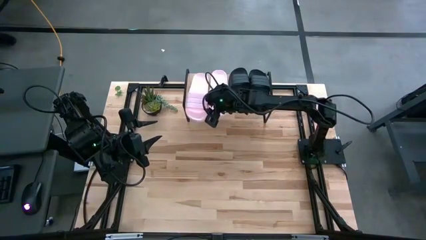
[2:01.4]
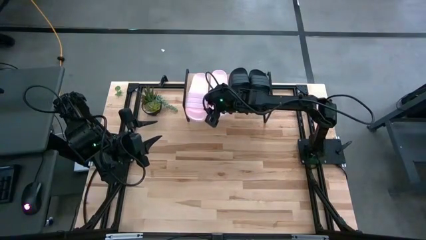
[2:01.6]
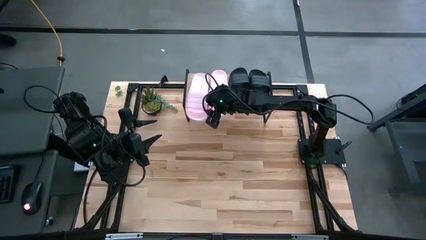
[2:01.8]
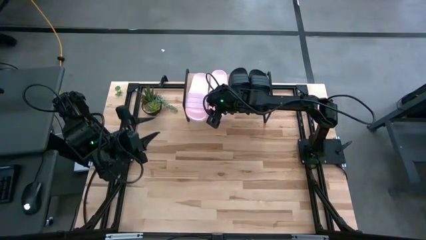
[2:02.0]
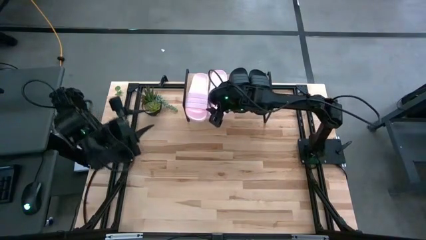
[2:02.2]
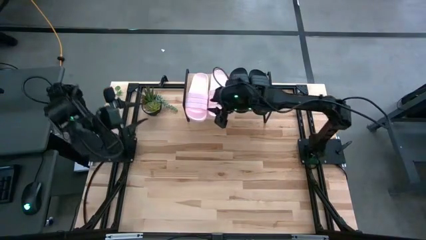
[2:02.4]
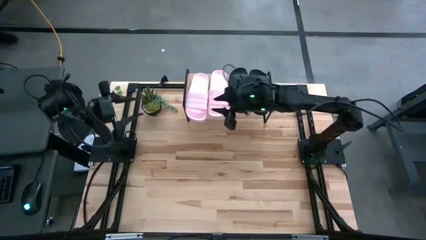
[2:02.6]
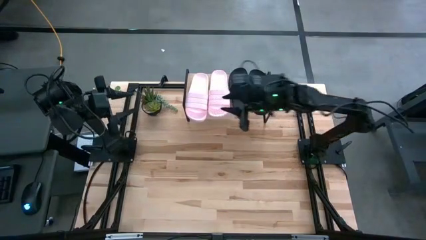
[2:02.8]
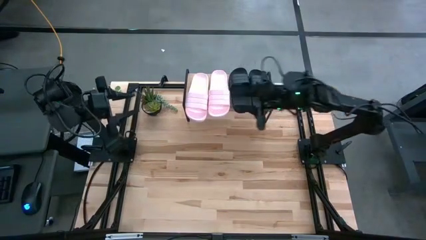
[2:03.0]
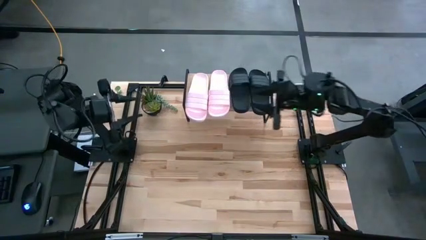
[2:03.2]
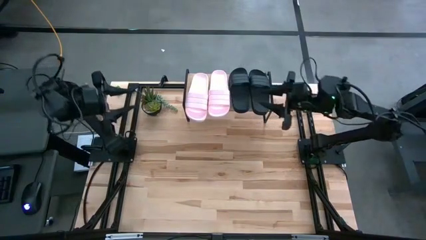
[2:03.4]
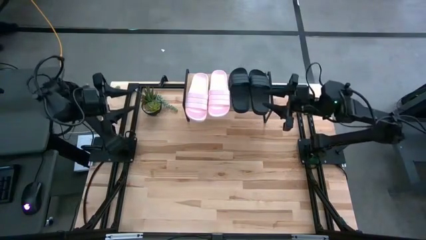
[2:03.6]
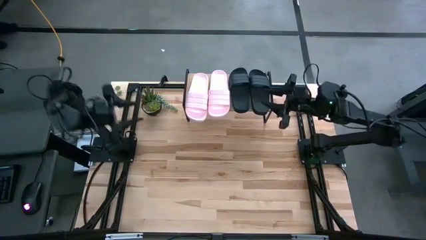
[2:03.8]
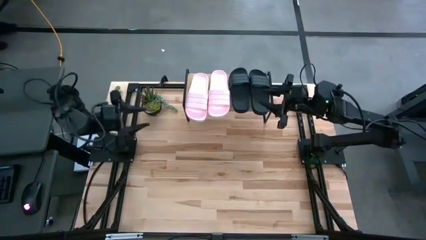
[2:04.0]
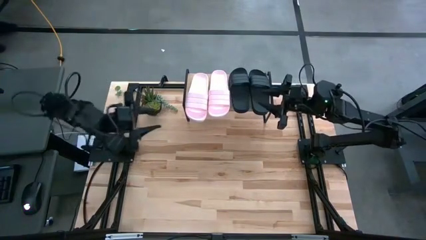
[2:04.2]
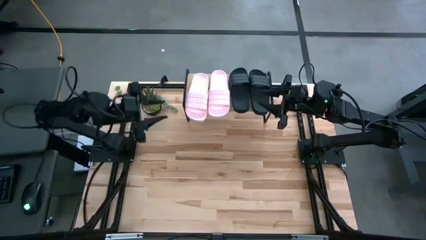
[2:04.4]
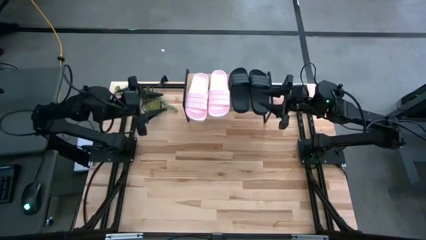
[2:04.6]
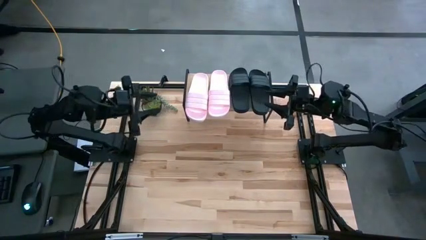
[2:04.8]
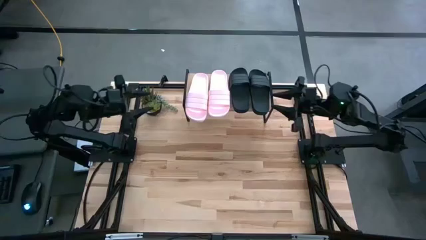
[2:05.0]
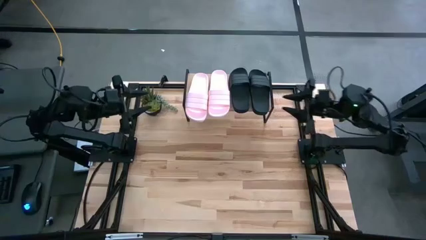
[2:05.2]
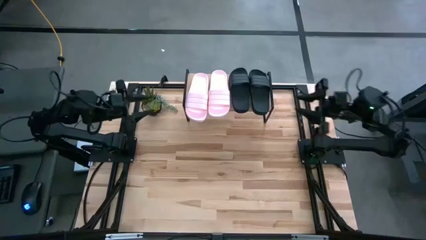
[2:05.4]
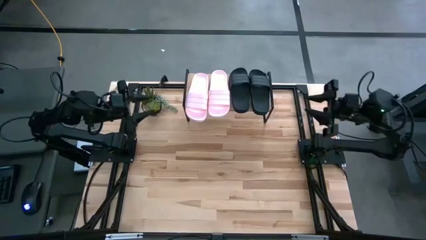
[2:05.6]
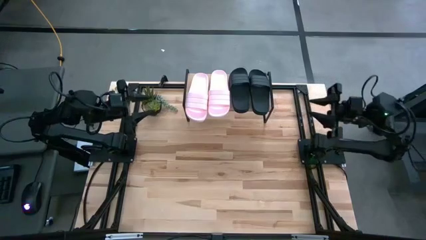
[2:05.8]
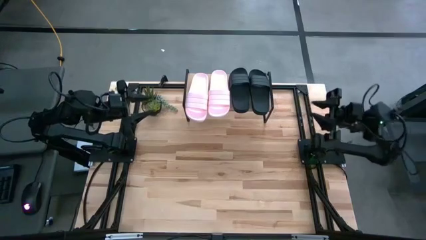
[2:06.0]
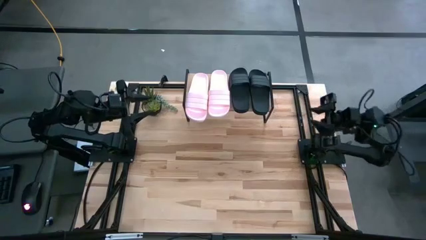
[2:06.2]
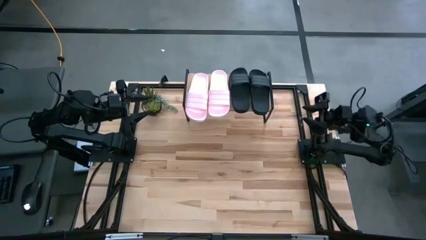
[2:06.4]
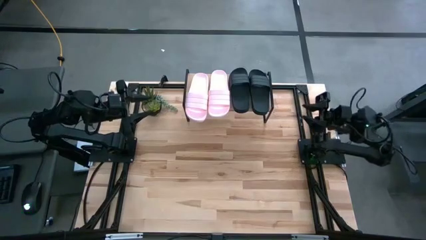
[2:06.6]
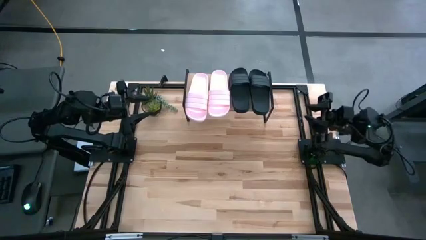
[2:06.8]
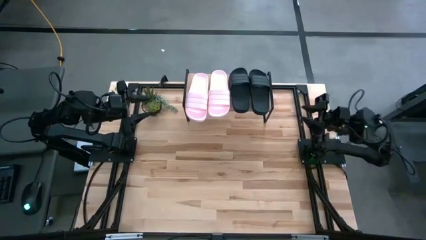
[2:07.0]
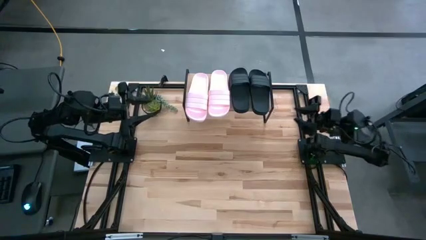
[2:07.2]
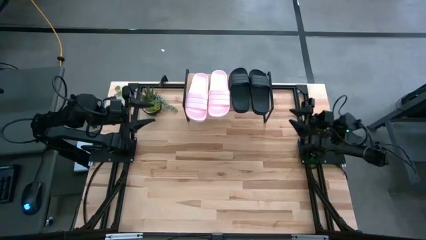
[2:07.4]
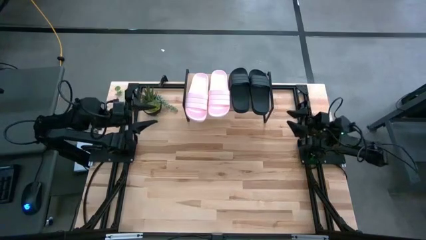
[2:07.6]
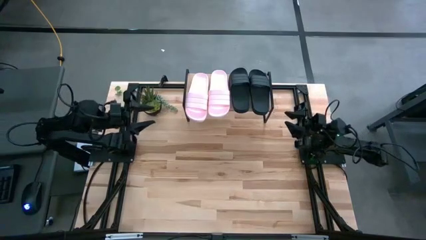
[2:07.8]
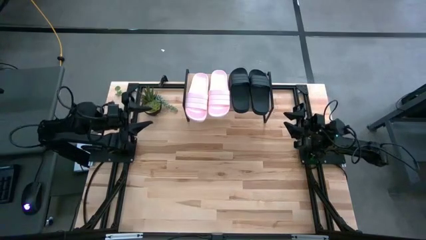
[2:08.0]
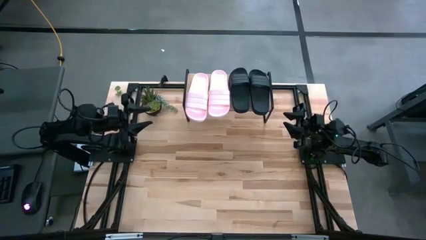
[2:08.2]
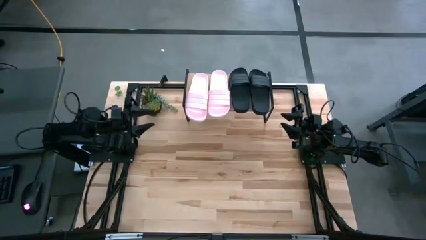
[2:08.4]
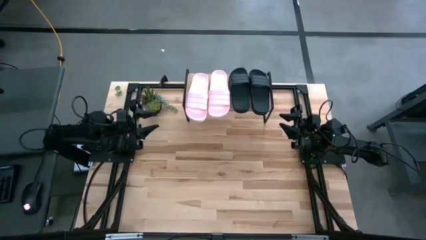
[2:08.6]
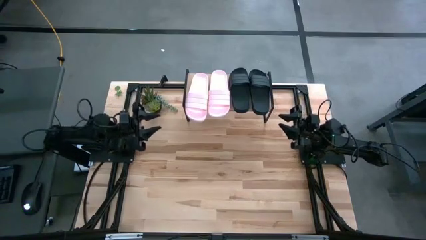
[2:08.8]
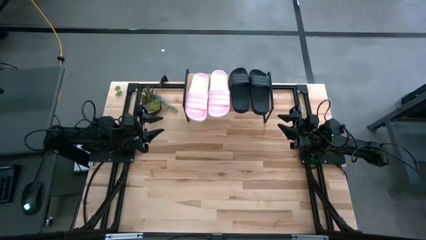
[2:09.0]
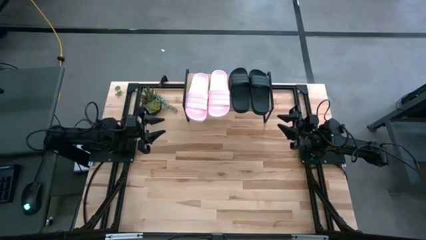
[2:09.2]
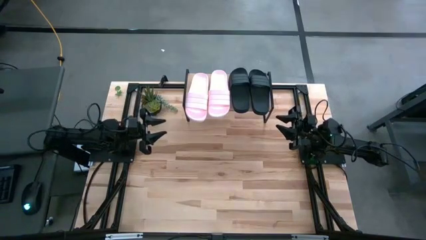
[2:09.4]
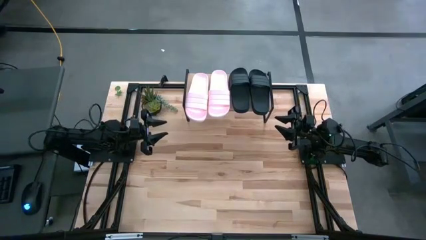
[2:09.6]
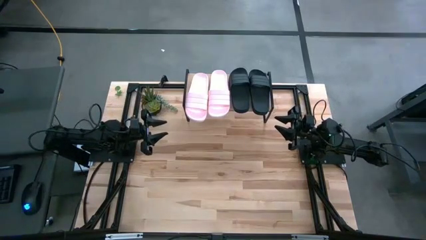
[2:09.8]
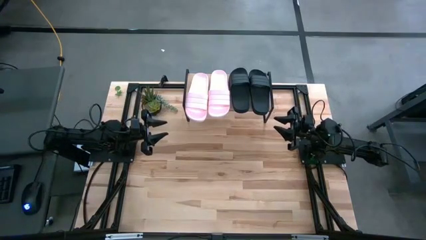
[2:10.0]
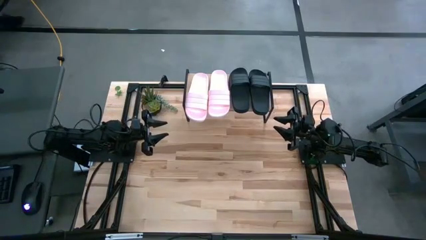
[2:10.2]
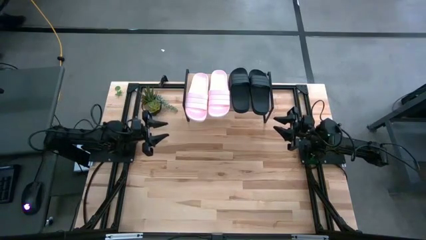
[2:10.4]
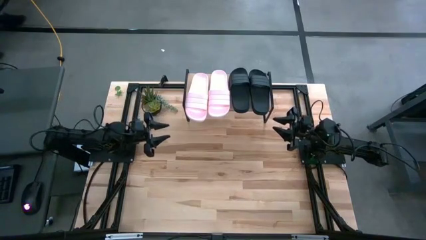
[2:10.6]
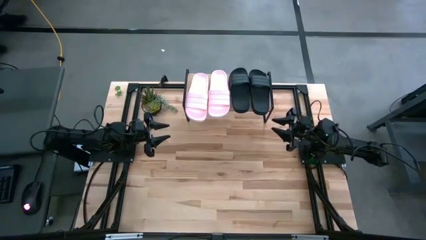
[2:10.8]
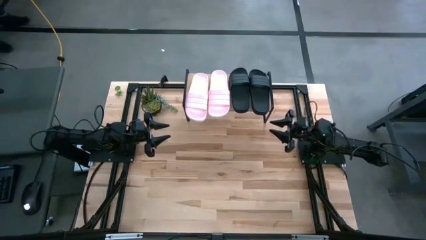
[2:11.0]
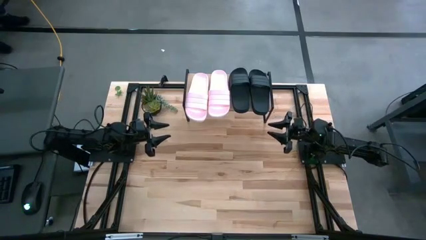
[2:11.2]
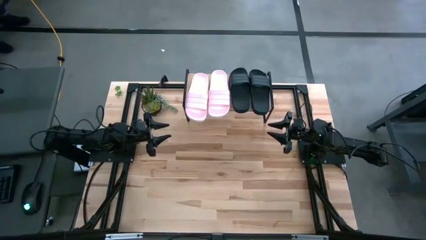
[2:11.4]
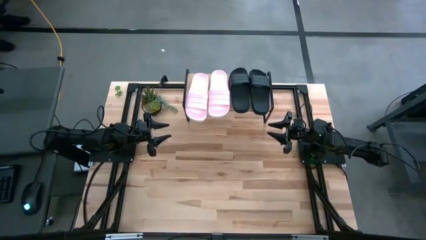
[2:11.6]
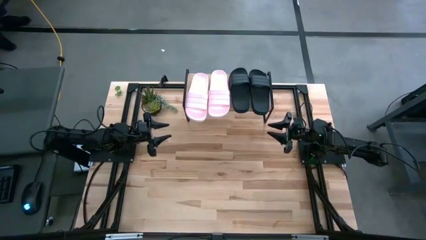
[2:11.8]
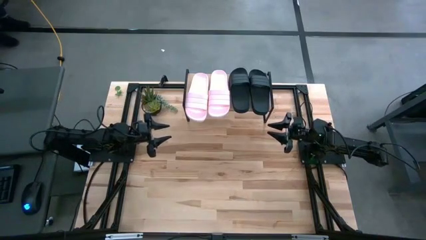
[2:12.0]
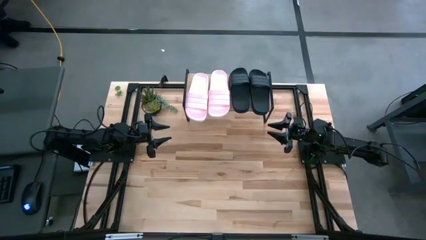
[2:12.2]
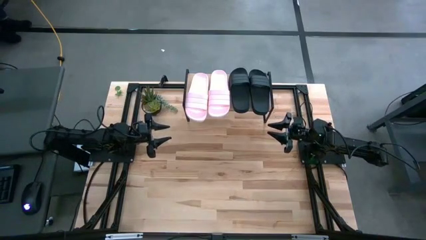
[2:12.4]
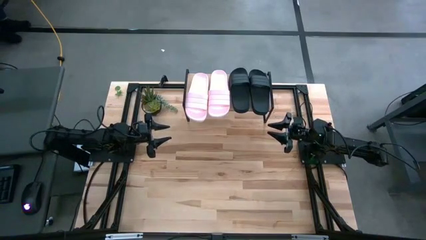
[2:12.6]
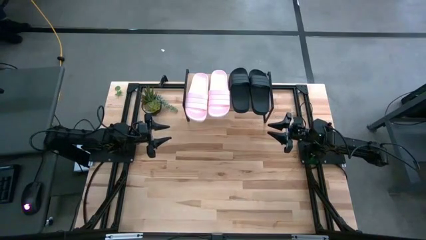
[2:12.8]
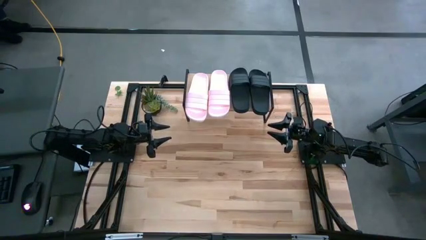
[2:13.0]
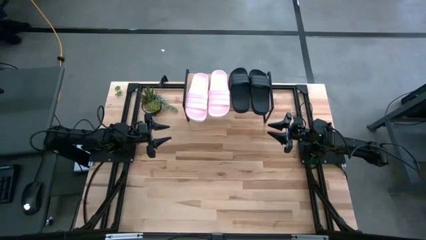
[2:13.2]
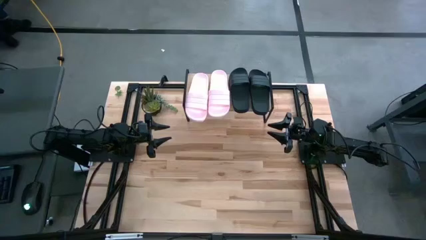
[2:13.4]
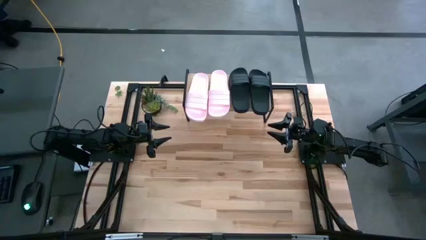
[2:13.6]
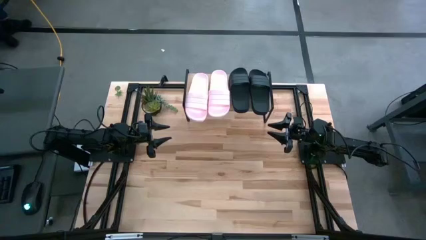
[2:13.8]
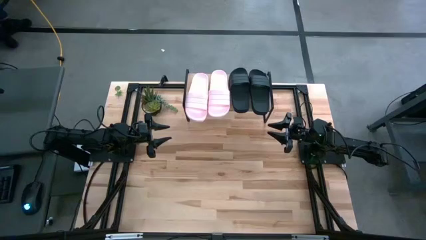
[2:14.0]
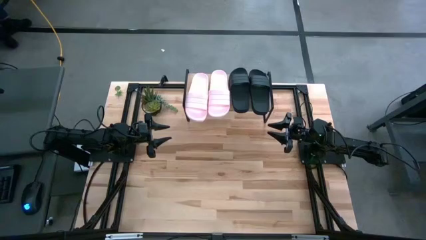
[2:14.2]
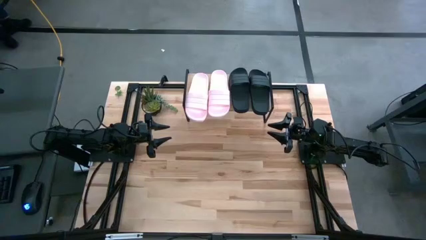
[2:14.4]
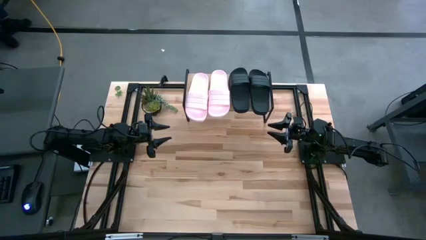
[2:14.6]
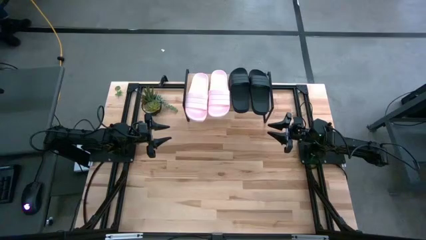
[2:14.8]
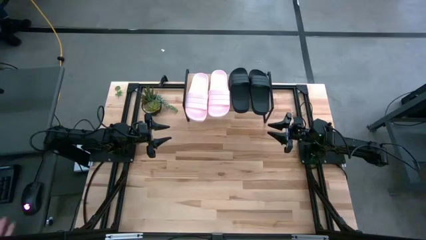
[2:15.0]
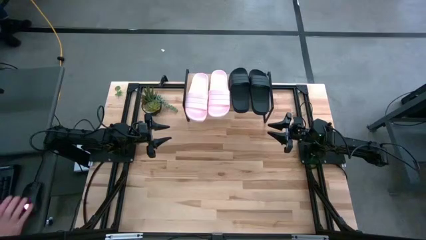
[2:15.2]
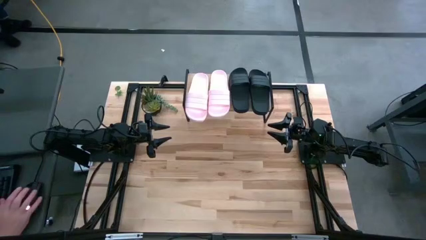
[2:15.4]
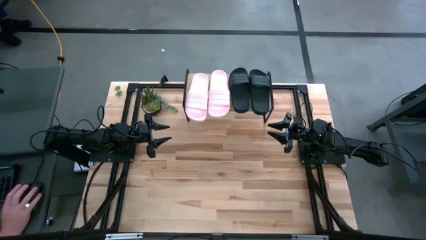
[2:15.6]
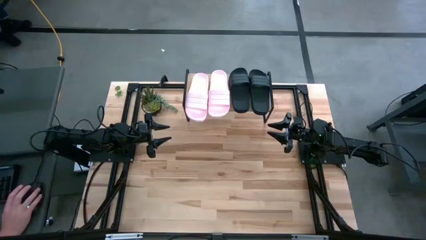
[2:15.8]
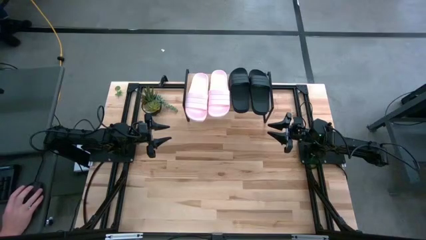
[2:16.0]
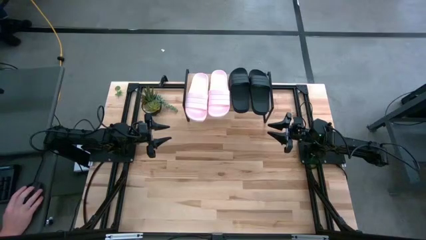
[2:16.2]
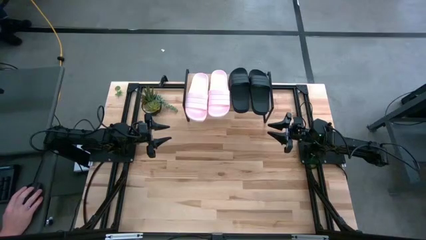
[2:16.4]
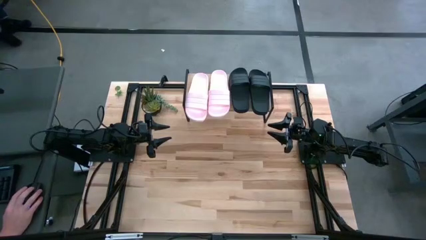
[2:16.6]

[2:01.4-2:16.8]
Task: Pick and place slides into the shelf
Return to Home Position

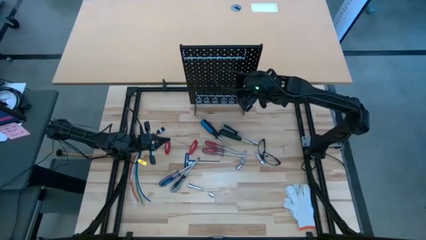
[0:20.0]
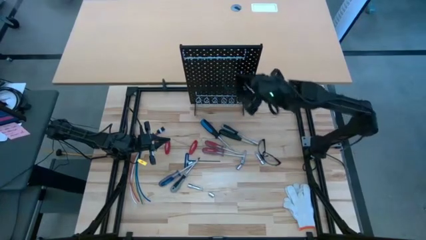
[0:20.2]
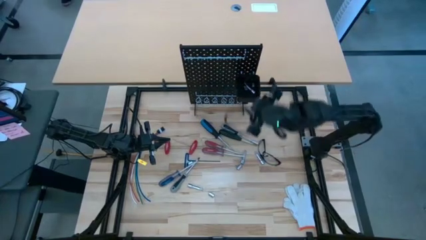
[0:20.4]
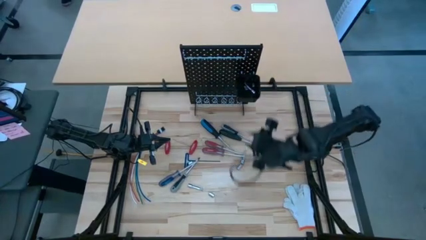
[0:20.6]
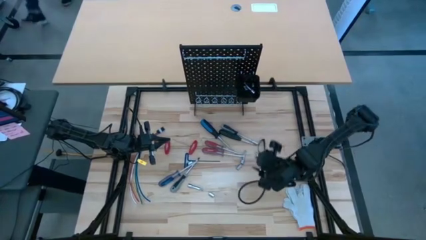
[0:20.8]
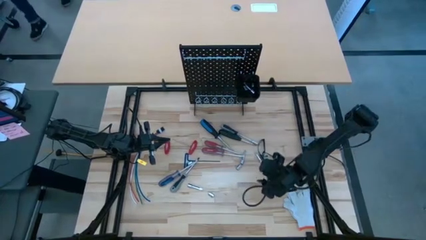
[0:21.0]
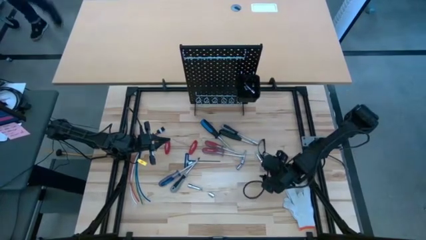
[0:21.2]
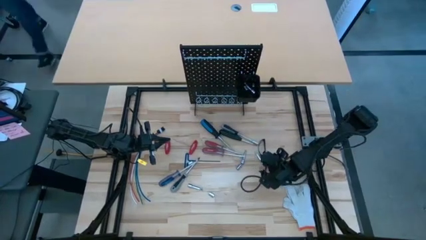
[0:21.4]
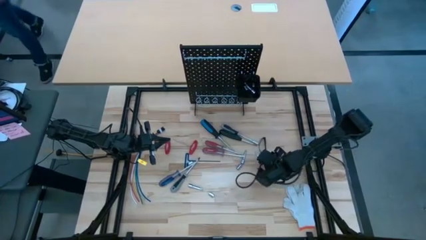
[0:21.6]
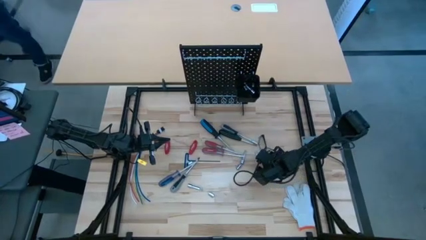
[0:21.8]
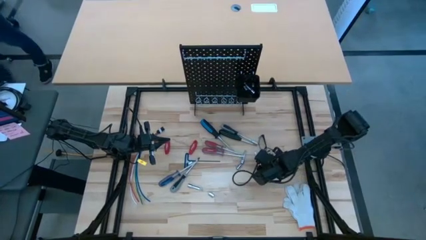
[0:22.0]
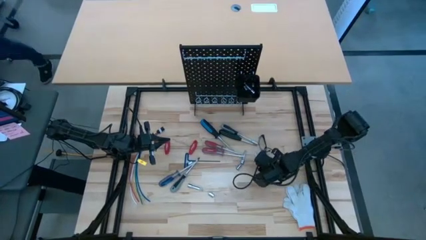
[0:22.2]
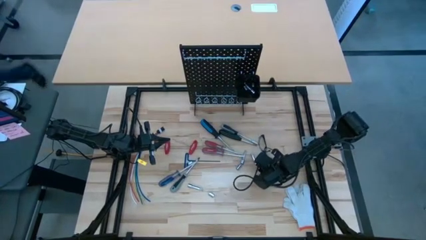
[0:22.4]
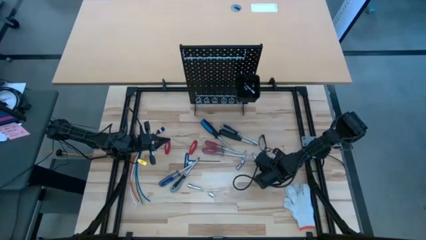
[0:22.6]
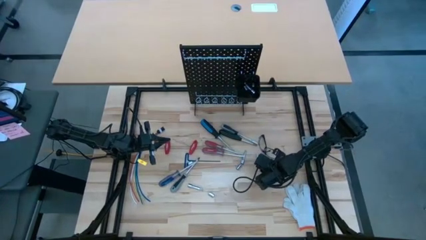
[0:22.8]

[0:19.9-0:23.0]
Task: Hang tools onto peg board
Put the extension bar into the bin of the pegboard
